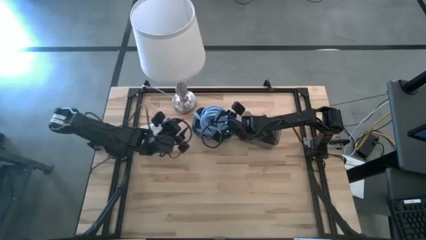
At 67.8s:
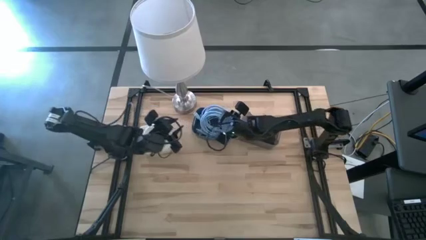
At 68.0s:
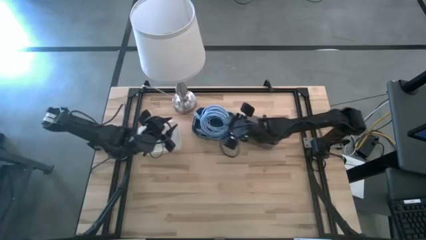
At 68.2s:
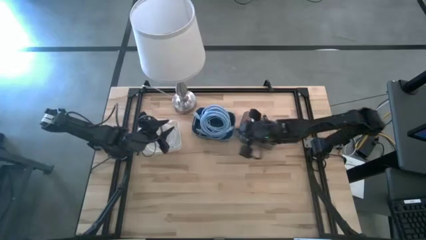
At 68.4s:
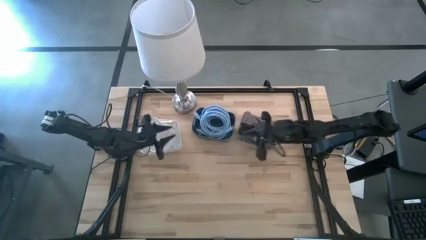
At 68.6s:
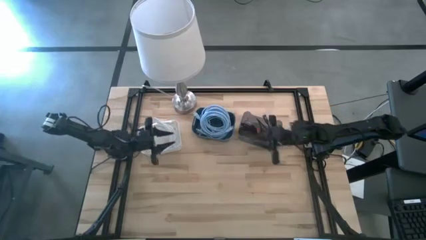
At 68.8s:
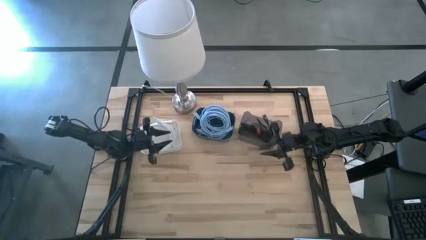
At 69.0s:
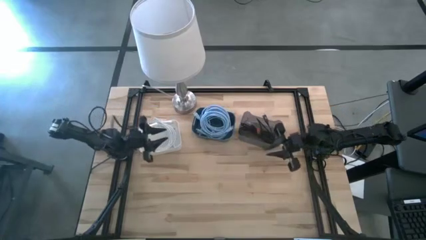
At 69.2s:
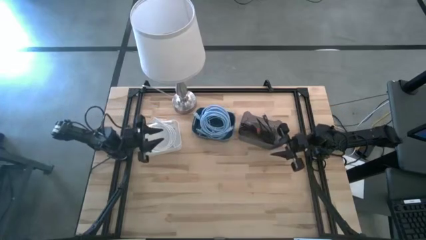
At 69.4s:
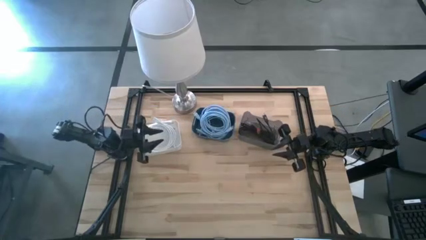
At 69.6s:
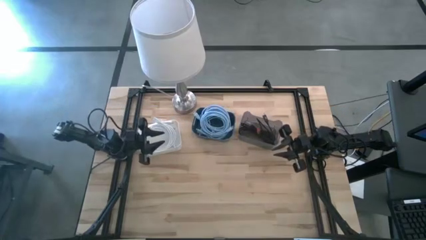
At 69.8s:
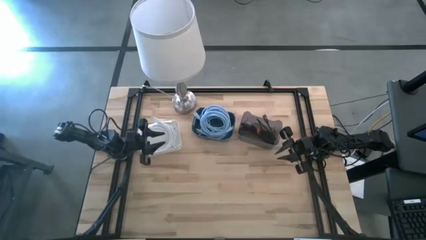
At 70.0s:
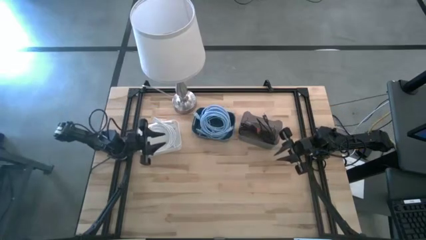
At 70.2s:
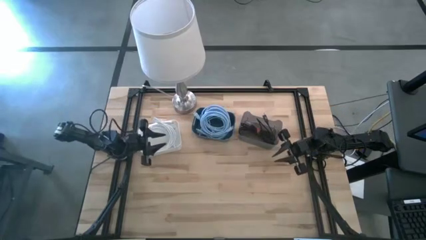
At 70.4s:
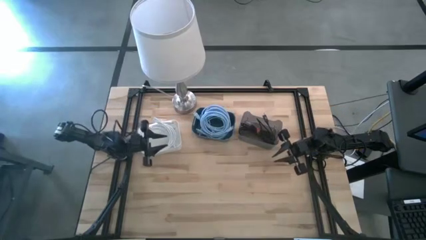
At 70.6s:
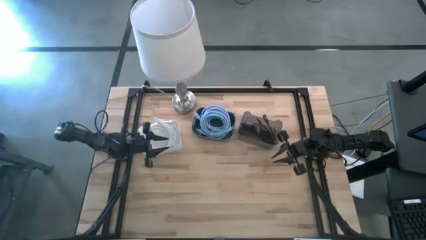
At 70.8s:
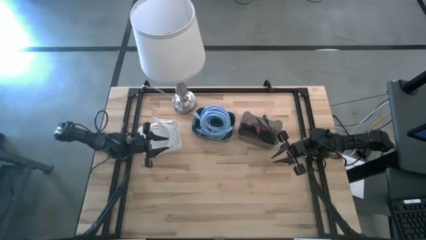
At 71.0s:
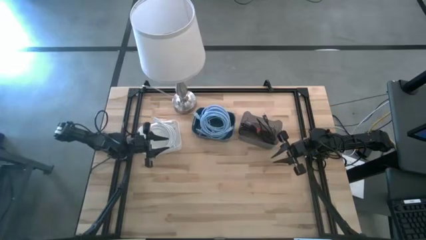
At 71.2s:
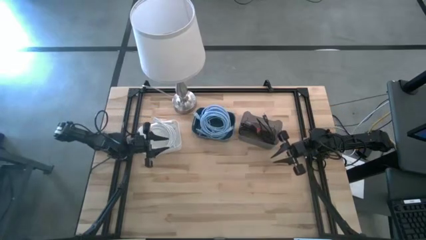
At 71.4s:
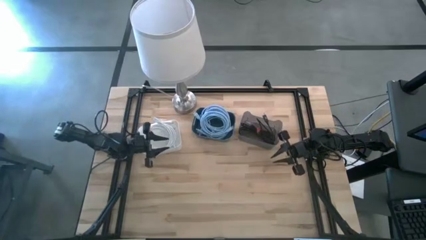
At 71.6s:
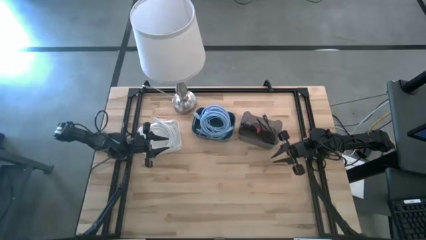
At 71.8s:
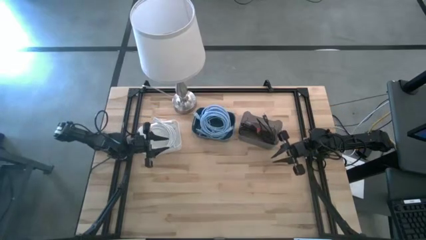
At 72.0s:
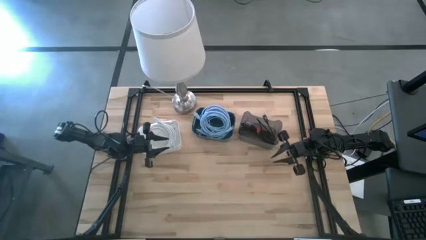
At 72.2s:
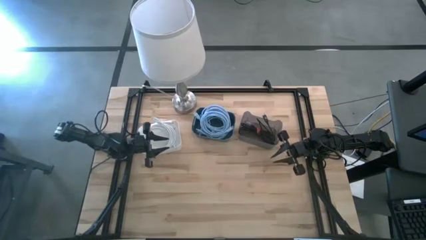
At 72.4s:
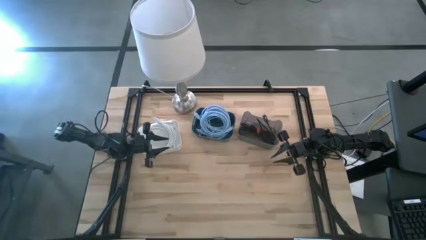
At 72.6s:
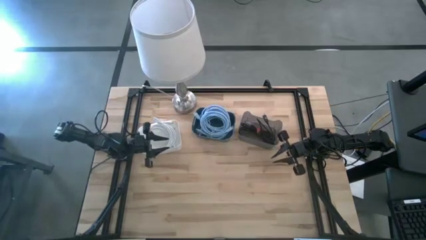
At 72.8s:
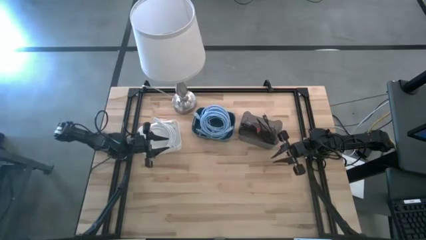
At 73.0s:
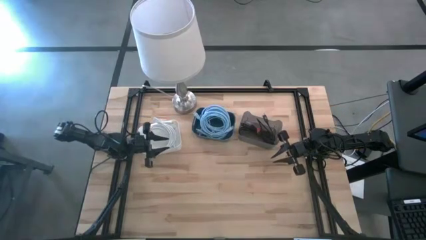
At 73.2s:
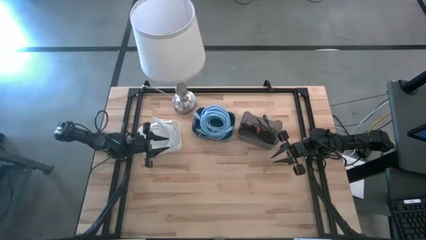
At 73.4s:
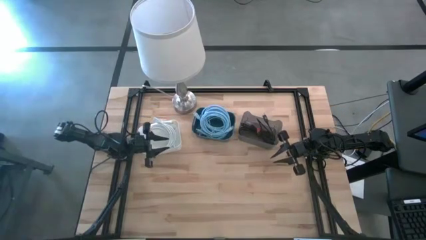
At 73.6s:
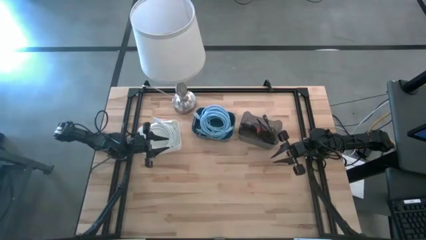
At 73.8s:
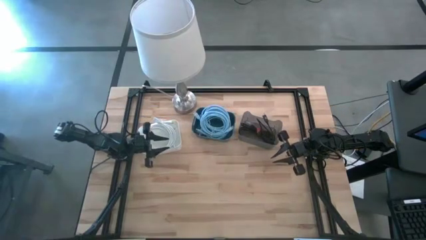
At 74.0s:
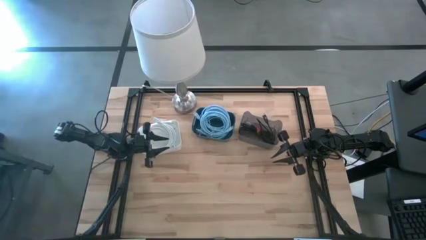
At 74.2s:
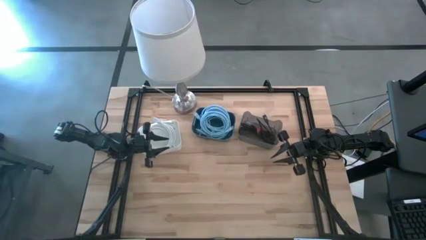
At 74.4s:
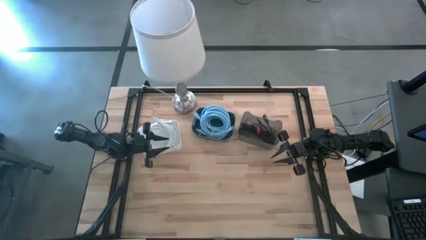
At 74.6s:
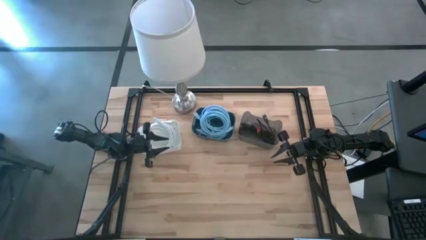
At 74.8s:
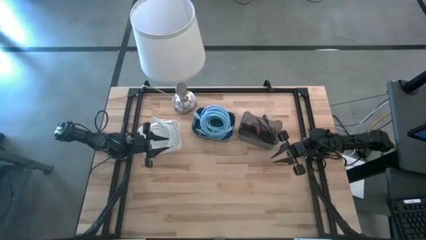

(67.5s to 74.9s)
Task: Pick & Place USB Port
Return to Home Position

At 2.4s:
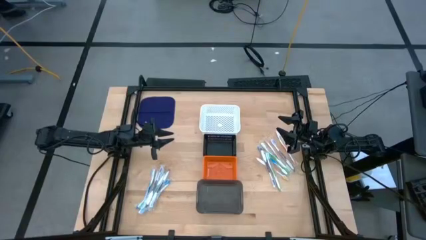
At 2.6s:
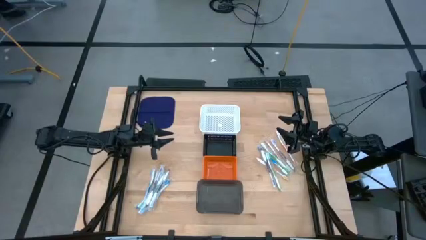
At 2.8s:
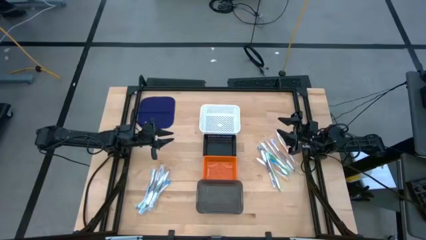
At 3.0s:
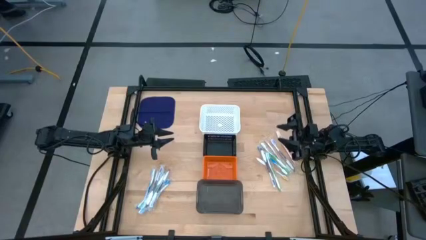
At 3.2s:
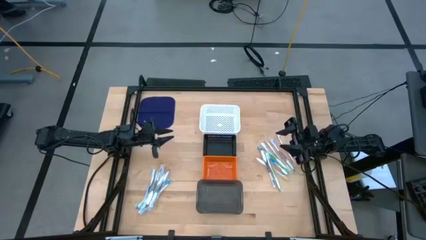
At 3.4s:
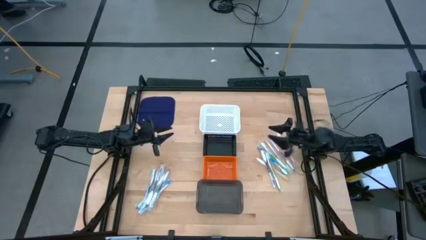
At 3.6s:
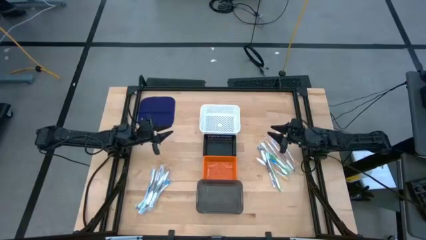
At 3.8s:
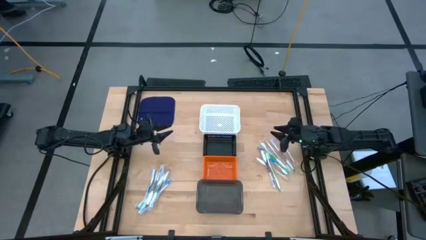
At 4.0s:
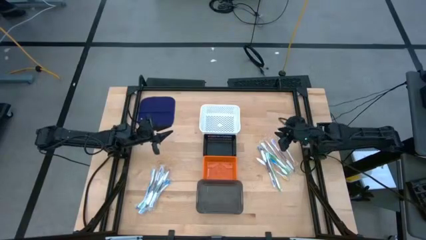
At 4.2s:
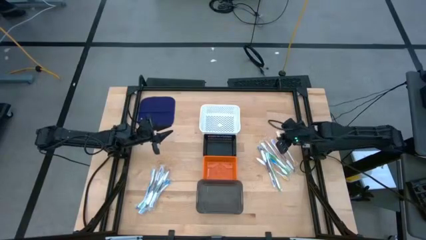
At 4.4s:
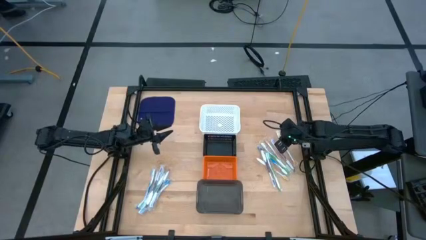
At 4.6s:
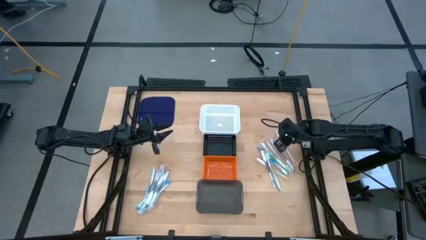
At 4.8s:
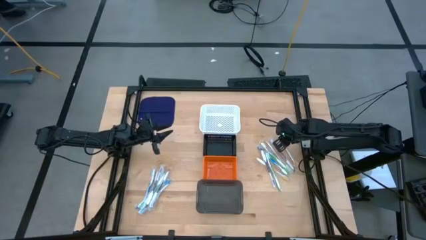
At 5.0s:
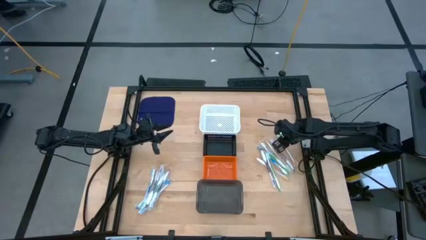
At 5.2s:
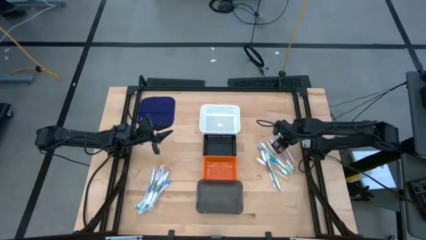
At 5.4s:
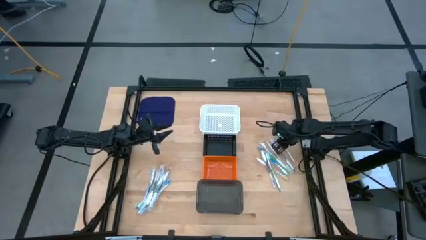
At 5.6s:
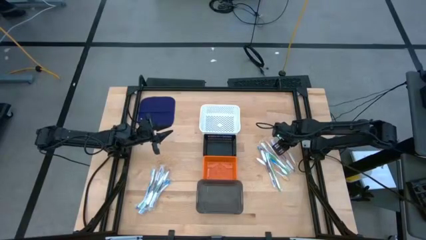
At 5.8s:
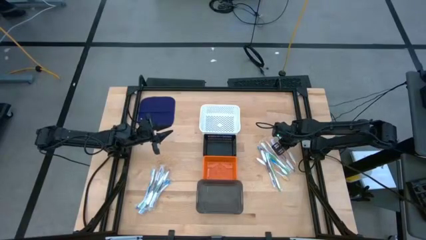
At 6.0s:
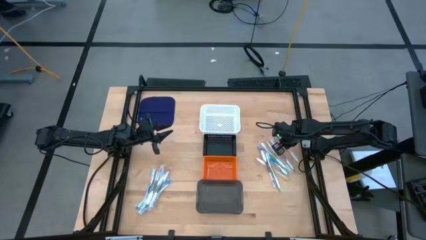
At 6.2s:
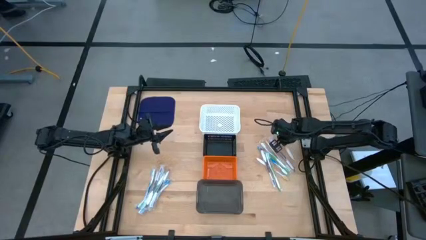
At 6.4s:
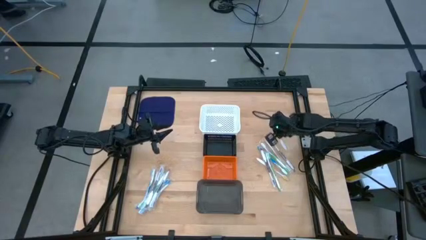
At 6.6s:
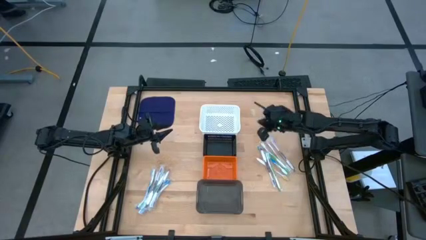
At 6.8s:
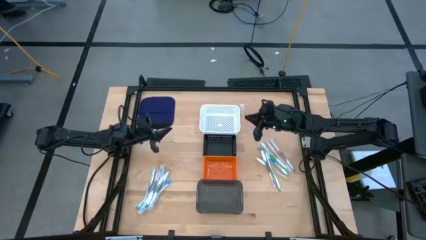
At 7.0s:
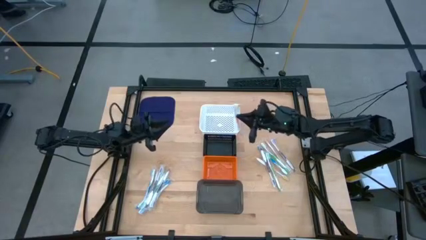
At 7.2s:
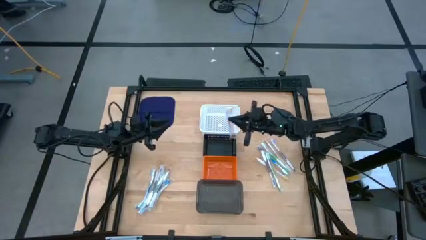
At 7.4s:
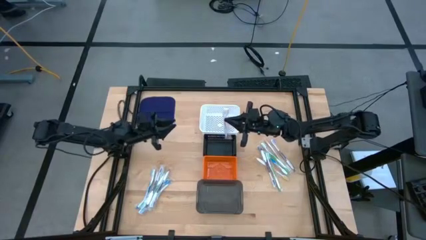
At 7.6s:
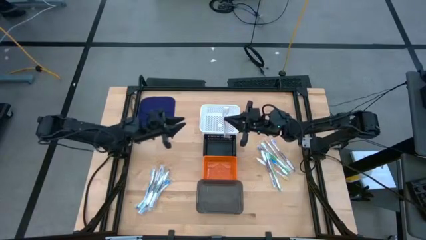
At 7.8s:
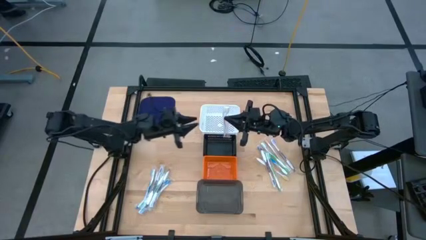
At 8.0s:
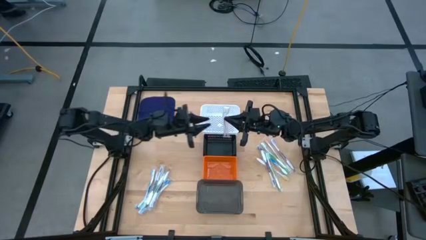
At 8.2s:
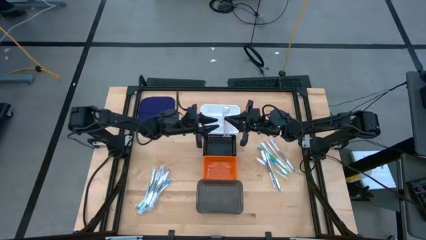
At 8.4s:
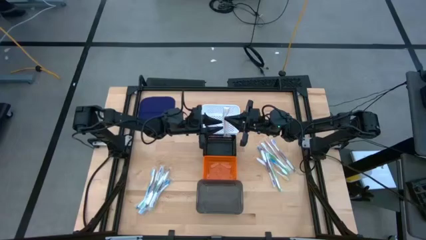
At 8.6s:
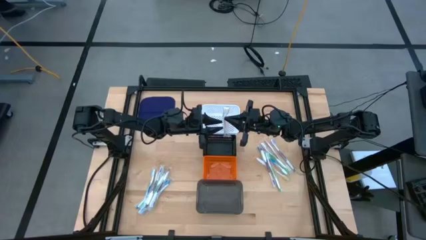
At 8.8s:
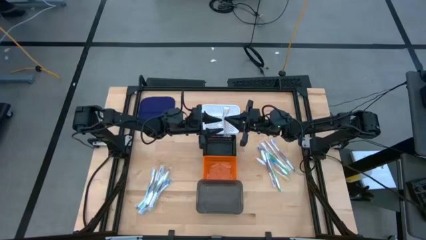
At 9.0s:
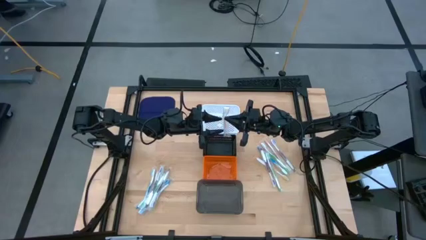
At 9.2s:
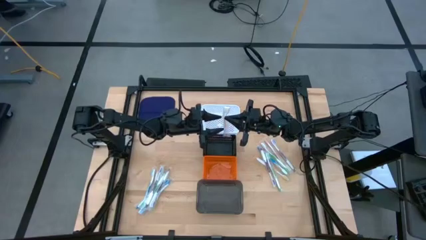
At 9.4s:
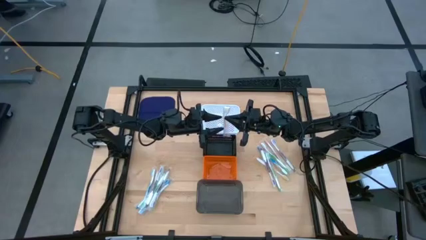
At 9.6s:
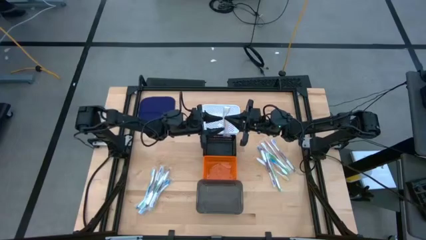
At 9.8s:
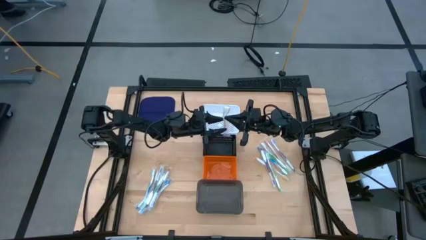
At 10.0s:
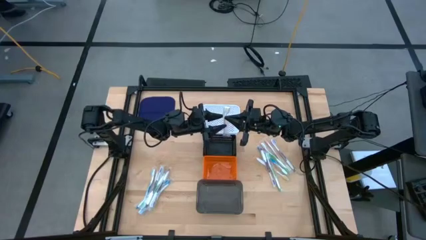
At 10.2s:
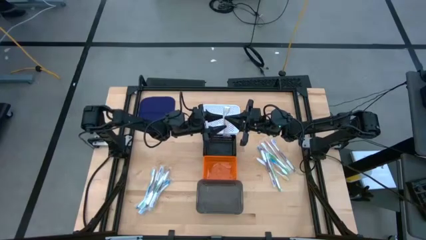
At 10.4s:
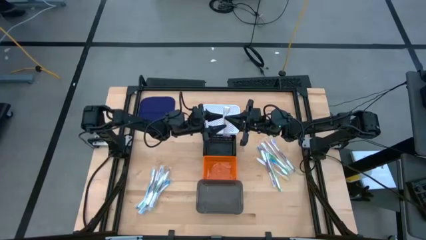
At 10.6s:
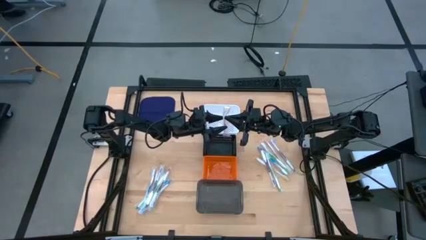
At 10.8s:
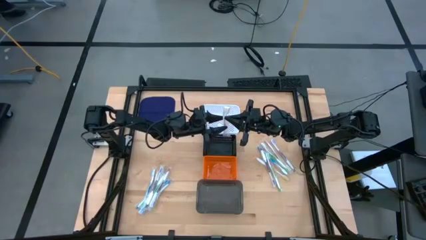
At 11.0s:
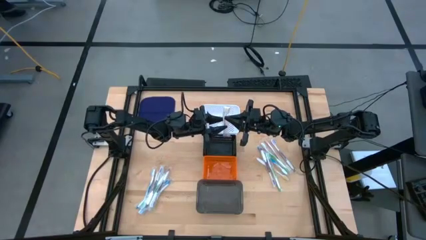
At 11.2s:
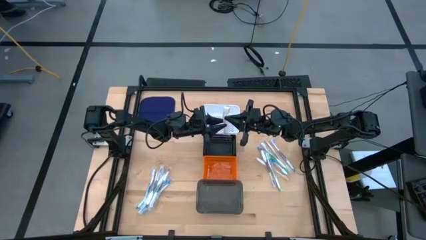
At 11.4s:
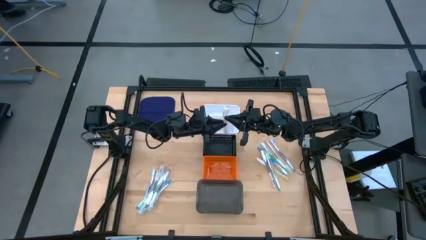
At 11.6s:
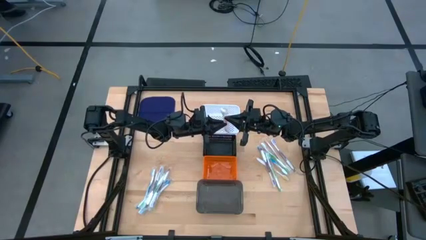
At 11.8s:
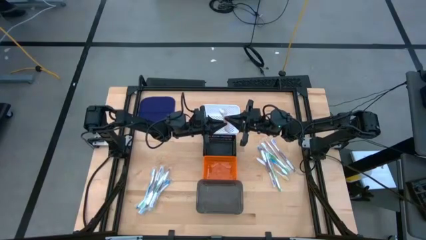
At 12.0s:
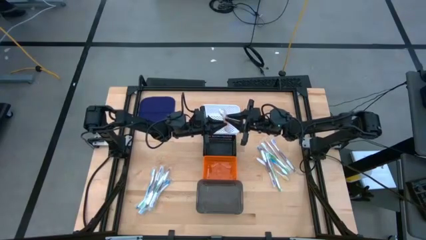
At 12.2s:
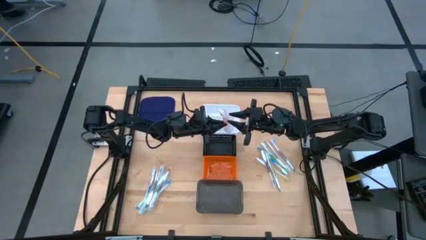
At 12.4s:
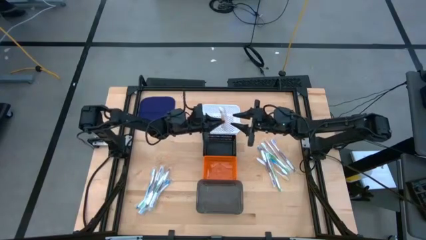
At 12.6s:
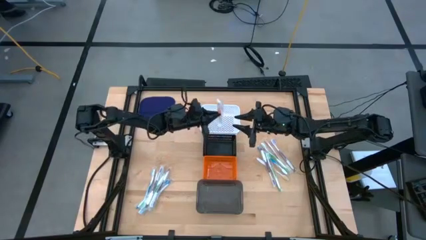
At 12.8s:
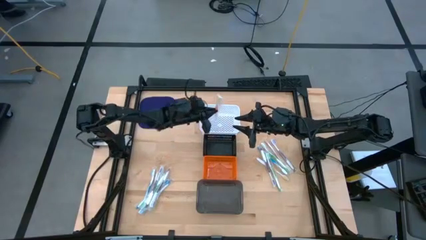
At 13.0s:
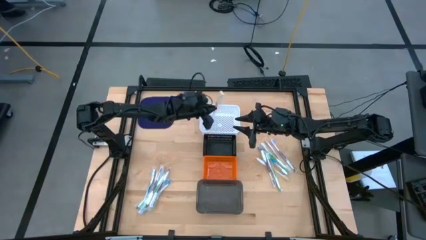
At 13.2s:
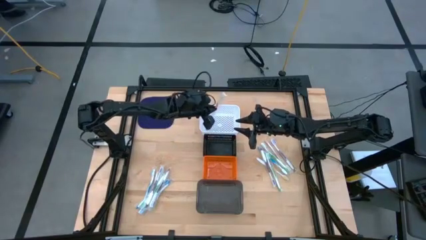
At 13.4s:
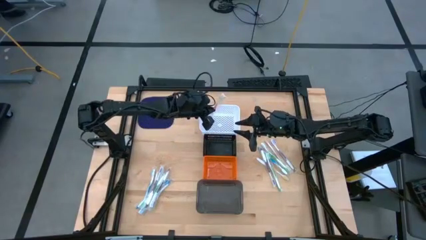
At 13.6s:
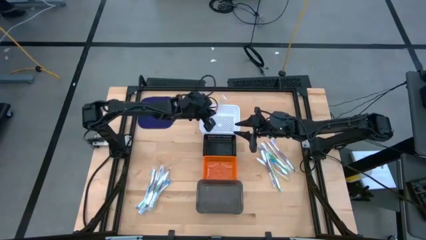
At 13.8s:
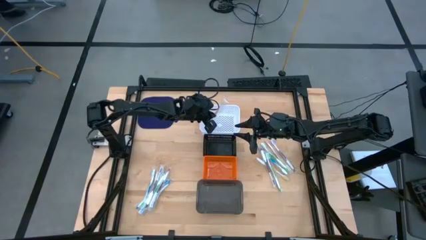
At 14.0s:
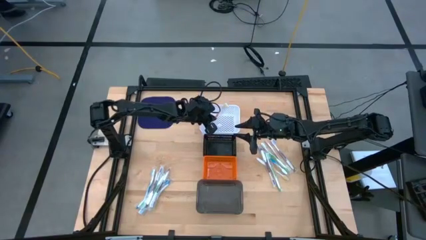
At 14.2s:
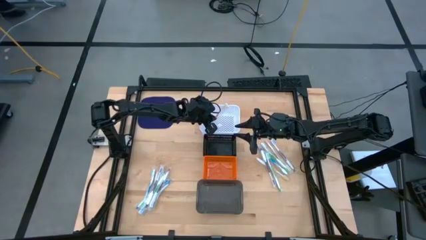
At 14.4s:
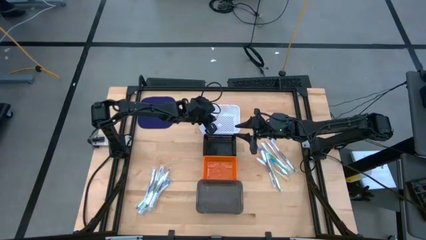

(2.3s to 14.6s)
Task: Pick & Place Toothbrushes
Put the orange toothbrush into the white basket
